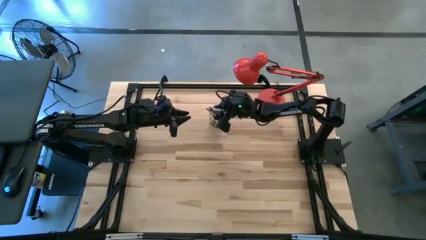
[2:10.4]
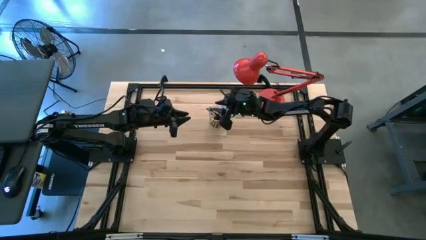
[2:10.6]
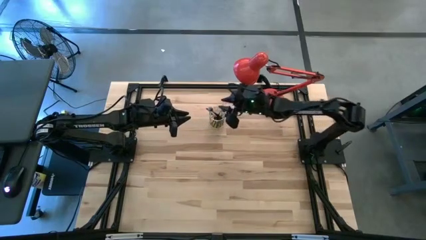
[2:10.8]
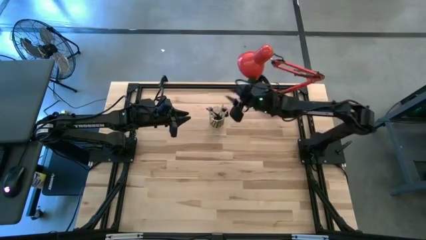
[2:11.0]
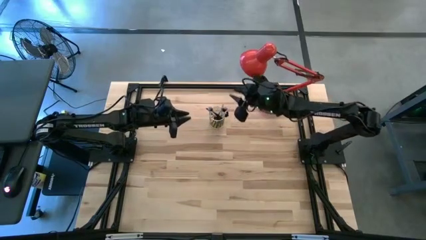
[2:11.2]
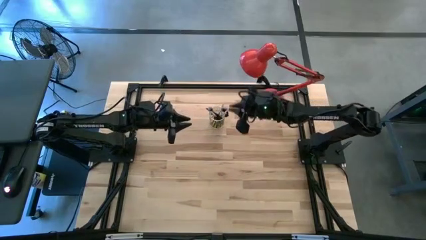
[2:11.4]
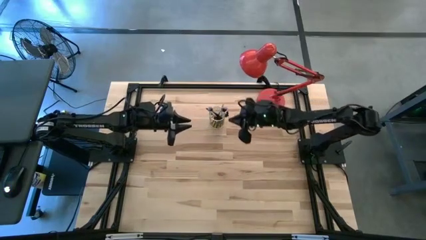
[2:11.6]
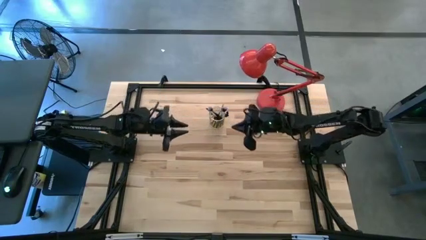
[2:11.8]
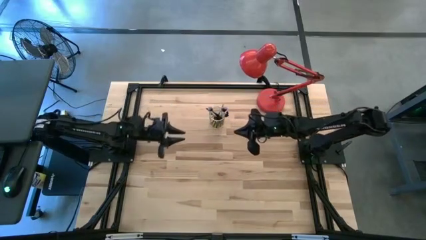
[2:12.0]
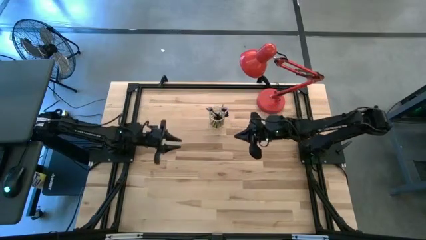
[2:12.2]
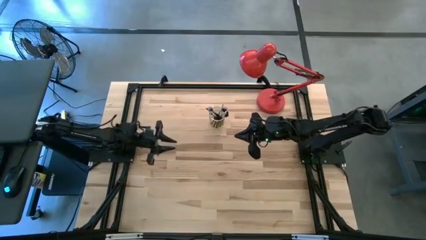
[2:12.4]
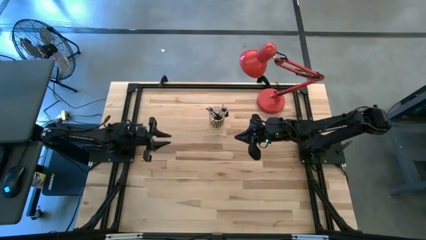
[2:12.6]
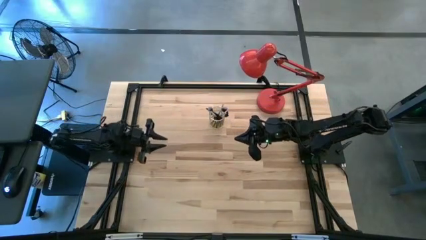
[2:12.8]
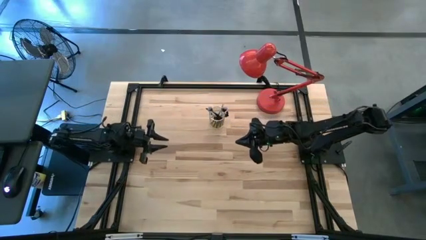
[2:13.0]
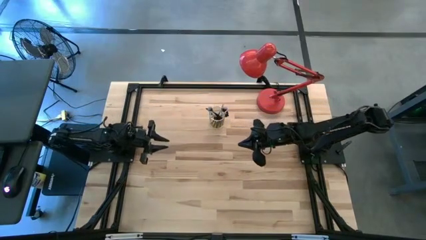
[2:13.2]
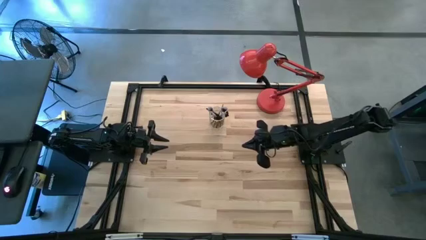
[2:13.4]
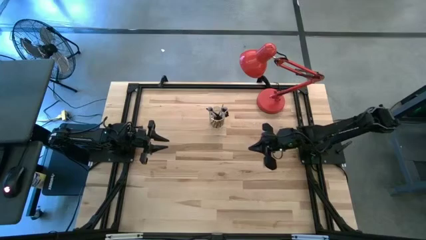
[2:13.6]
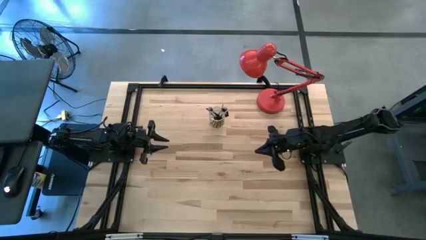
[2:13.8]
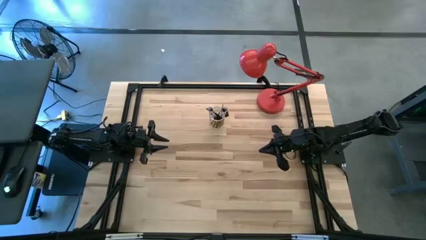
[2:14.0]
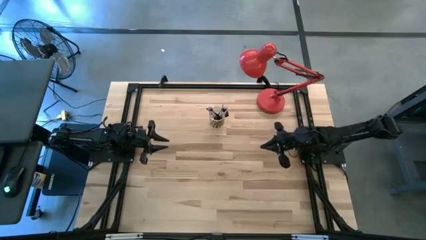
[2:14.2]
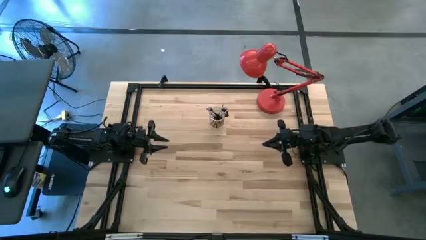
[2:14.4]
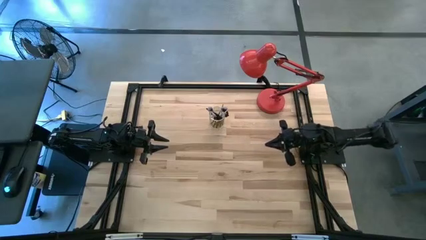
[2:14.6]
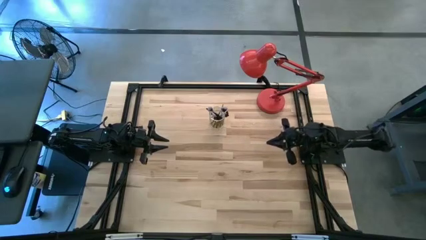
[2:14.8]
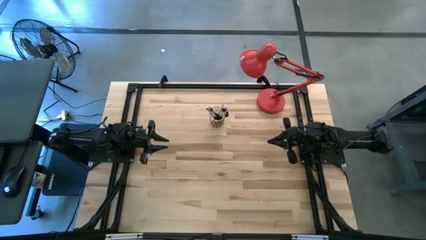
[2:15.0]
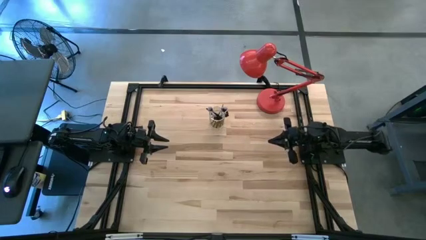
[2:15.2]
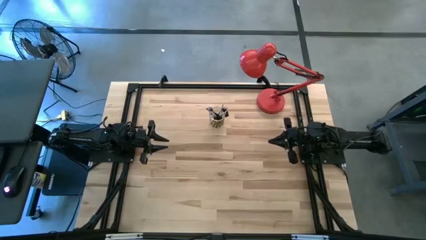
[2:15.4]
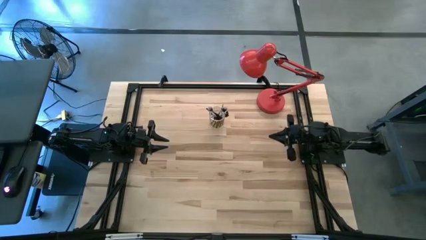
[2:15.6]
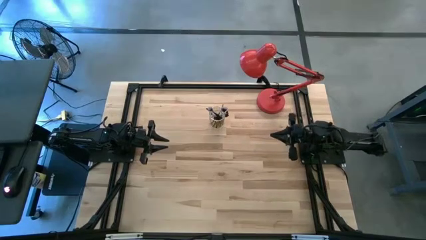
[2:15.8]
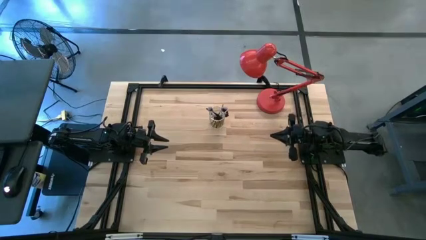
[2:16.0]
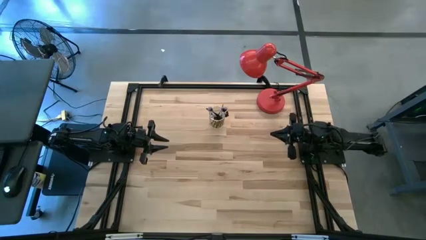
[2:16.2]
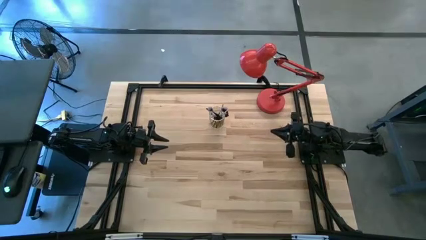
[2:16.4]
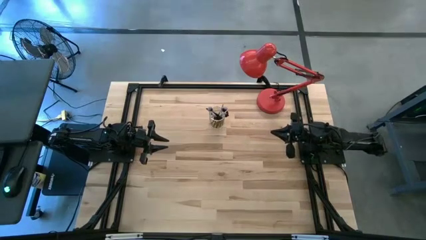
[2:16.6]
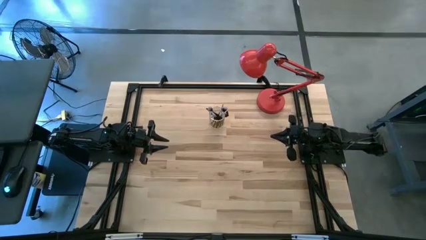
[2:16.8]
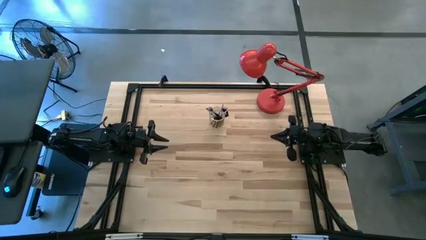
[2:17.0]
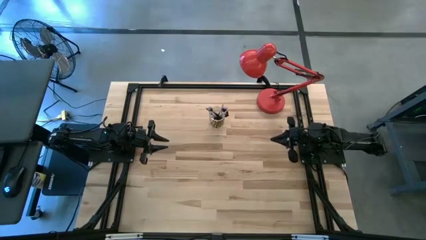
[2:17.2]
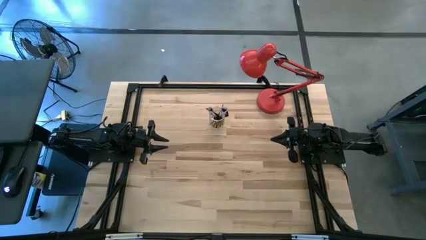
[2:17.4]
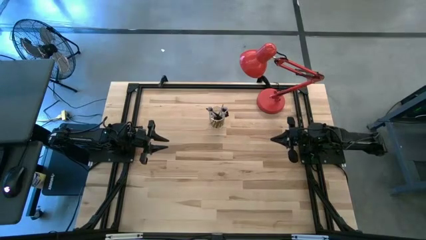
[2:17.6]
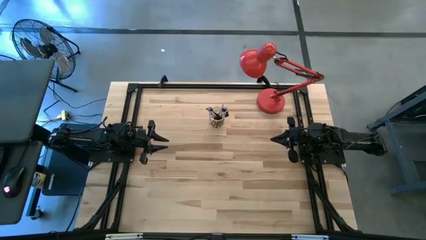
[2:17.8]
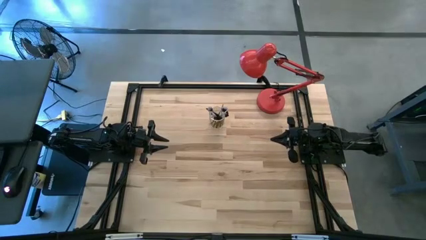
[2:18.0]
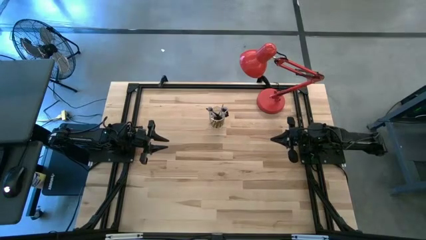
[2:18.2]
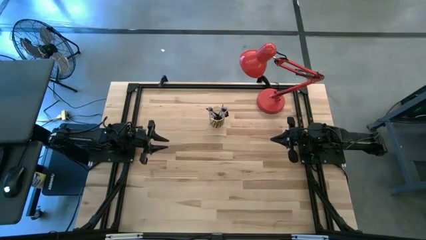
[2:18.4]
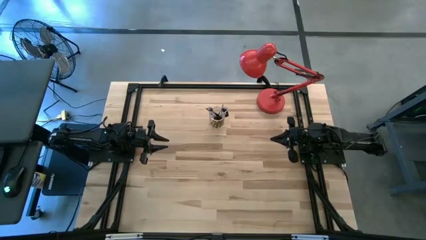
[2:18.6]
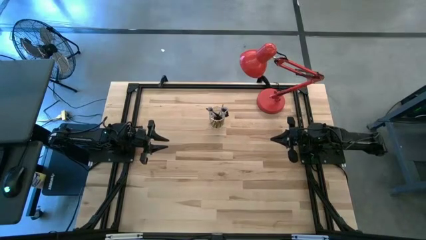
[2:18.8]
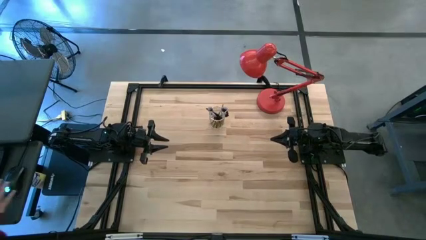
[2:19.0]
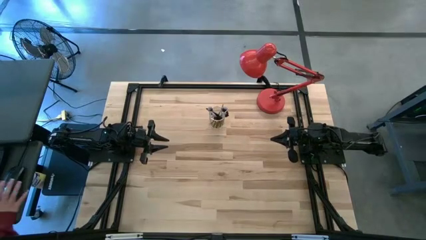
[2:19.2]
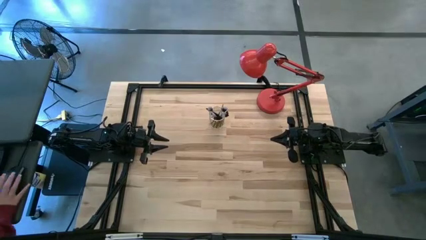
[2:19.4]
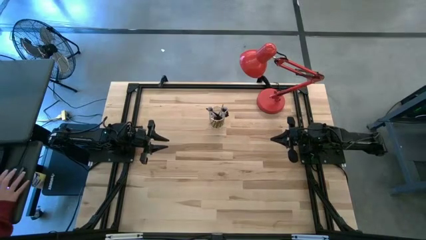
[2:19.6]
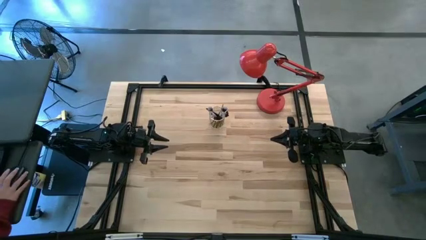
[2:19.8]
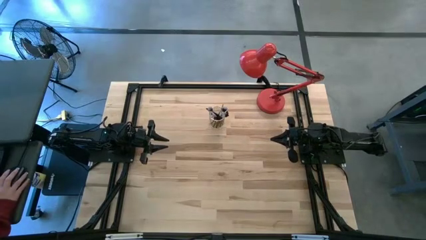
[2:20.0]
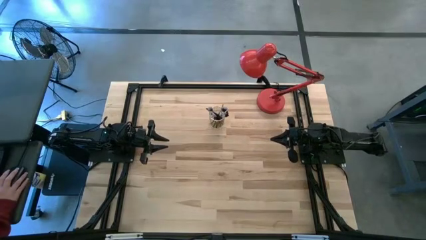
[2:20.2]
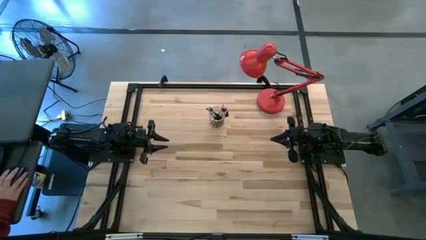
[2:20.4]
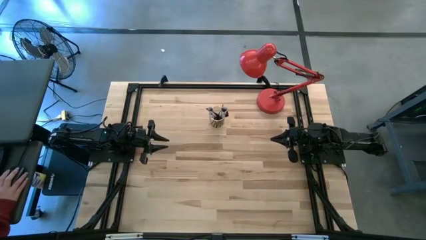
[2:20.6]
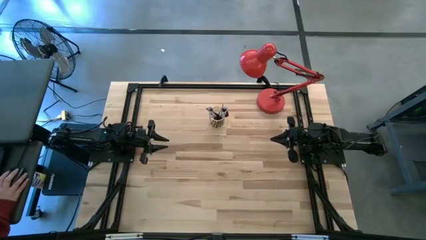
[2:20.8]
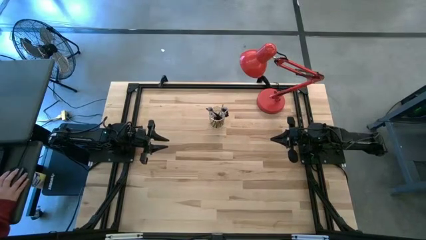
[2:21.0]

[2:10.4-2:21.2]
Task: Pick & Place Makeup Brushes
Return to Home Position

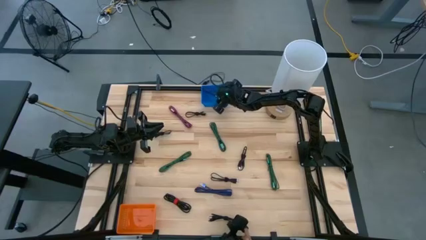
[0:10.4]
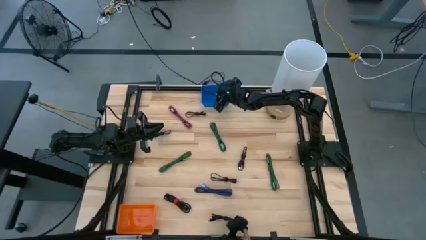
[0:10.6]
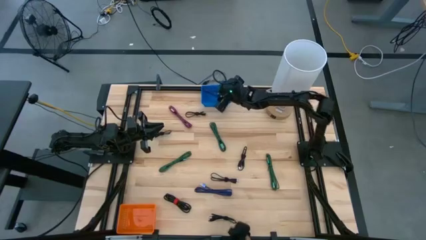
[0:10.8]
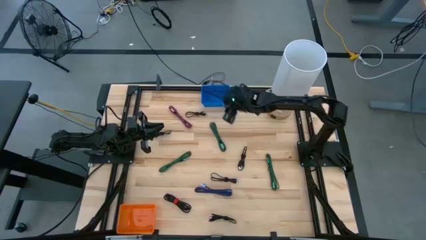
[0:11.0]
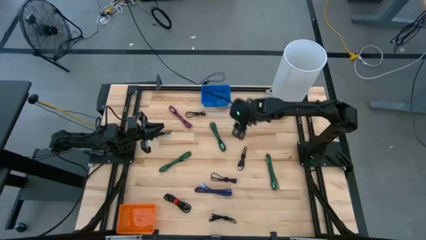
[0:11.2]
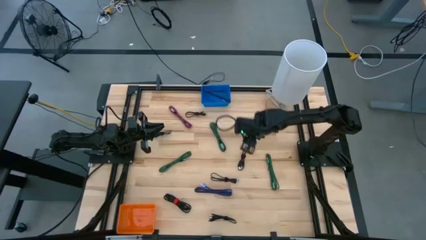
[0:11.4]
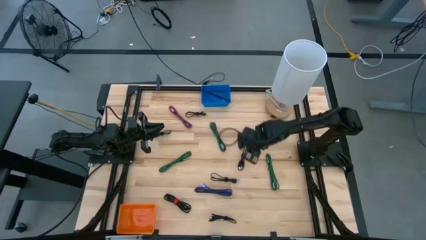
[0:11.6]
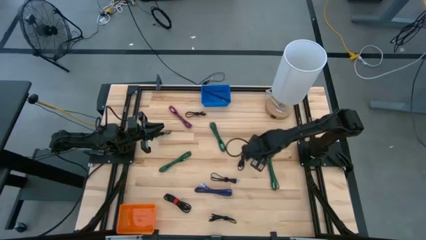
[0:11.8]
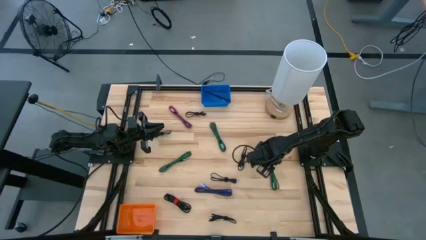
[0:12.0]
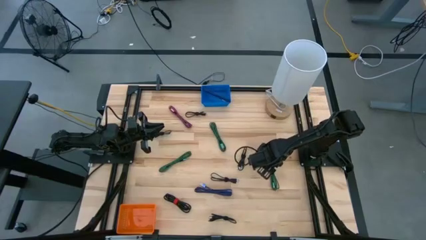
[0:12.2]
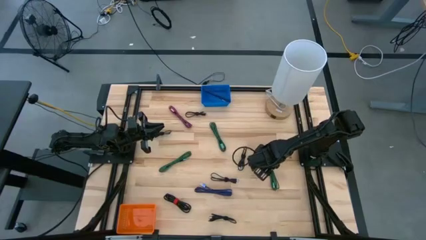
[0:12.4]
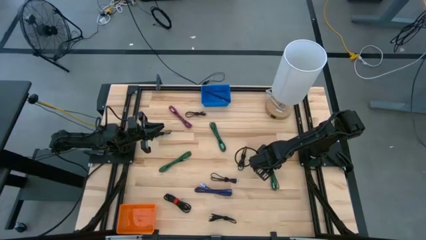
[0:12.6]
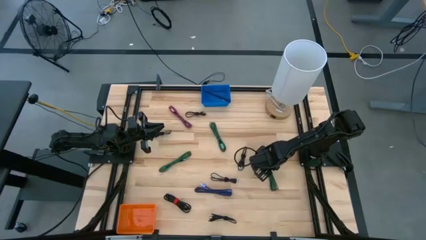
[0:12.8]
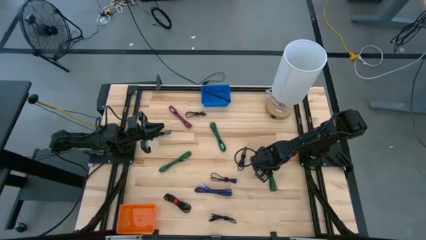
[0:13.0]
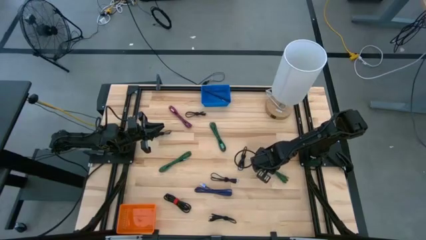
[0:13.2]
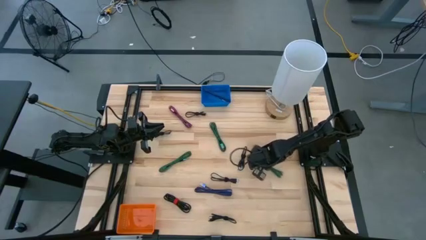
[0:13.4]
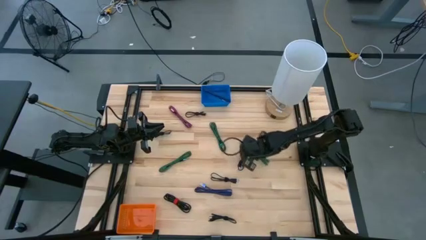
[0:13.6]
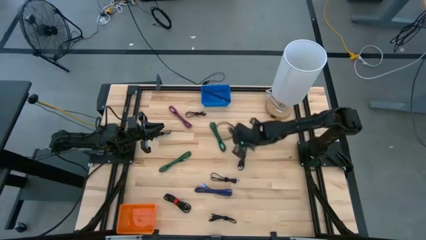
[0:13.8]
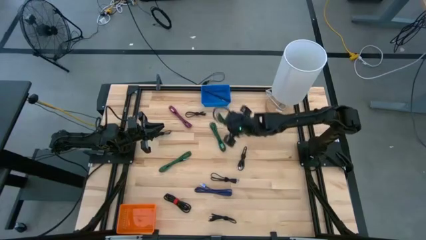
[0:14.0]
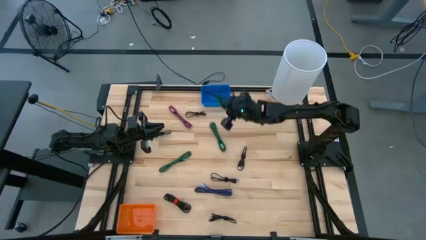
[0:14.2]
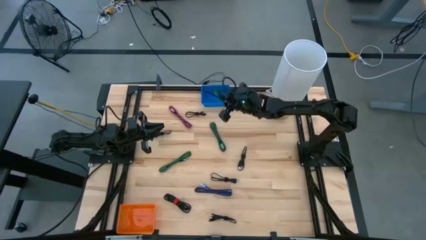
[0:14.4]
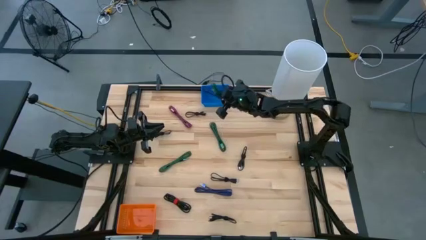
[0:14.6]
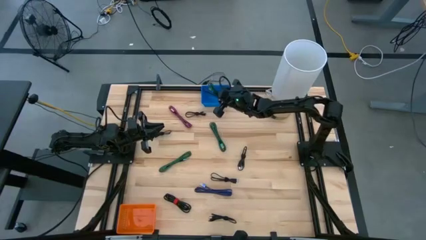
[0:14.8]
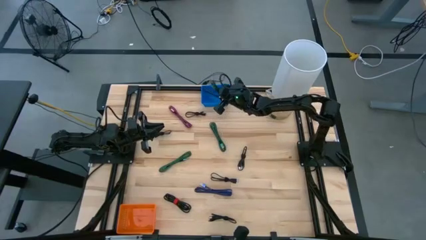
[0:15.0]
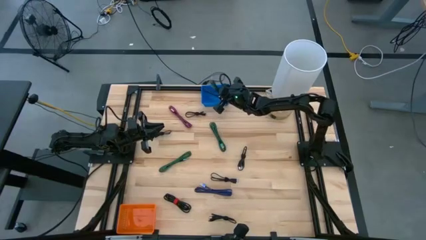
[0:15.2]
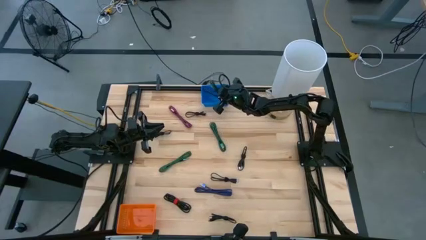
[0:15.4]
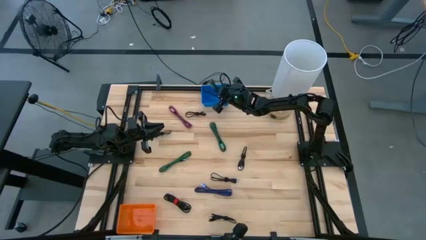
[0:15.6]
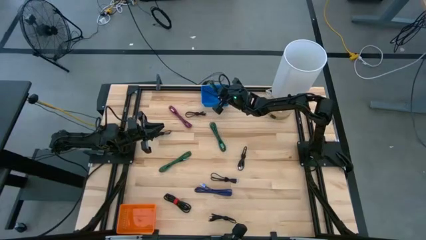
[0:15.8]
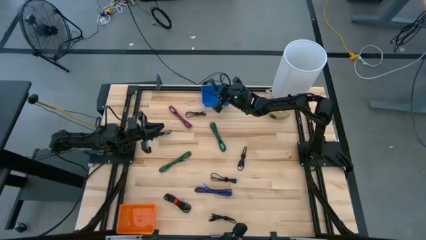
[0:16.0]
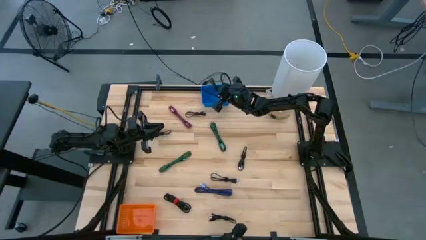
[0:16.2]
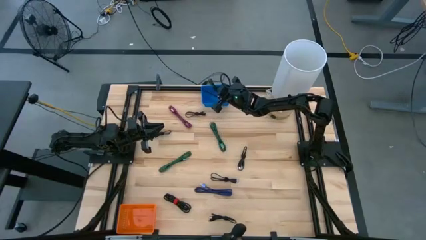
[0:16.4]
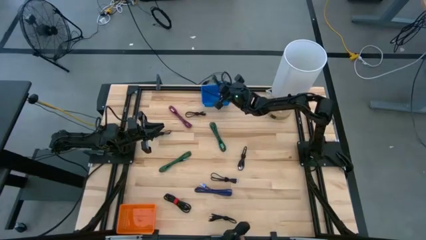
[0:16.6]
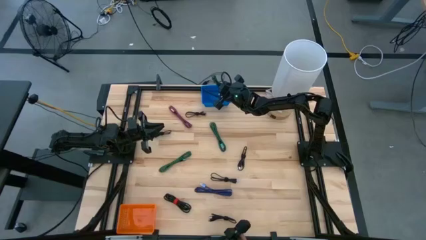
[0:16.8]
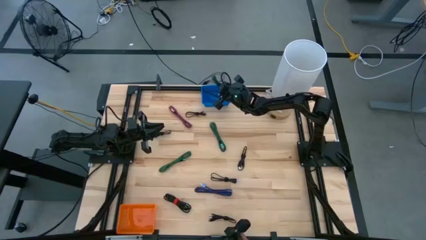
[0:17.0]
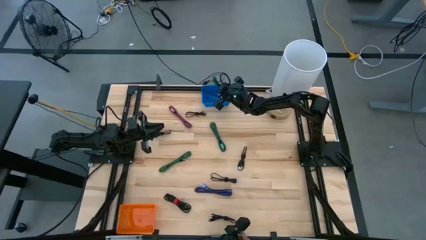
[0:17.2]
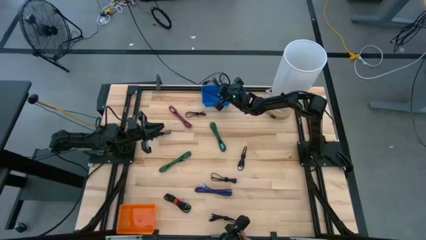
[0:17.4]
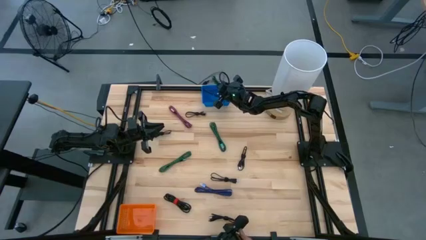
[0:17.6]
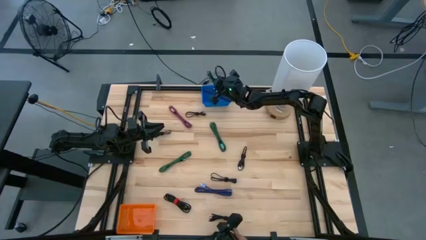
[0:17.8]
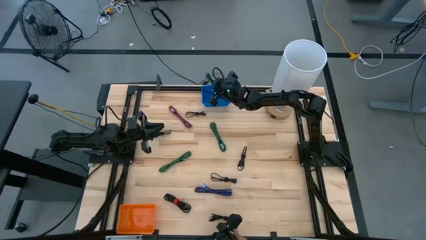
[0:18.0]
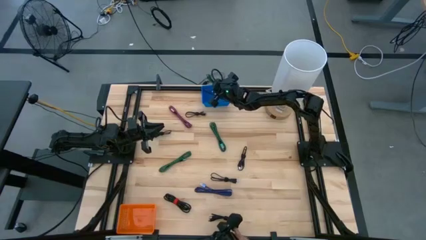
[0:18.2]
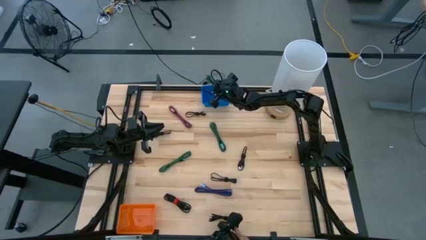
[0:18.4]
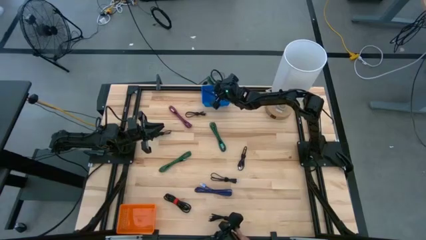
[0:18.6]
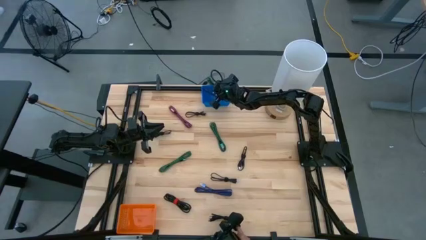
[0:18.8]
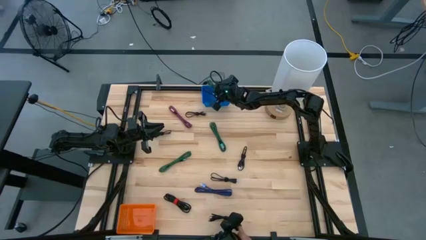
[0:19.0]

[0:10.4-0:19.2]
Task: Pick & Place USB Port
Put the green charger cable into the blue basket
